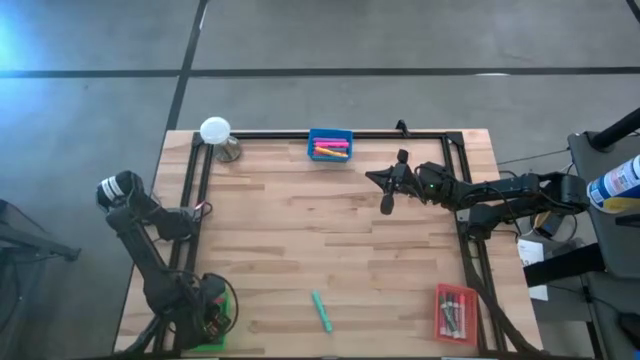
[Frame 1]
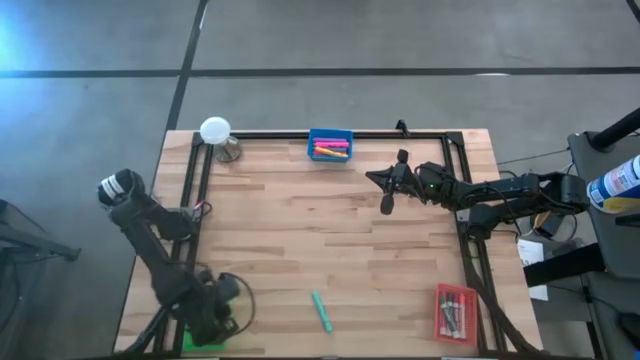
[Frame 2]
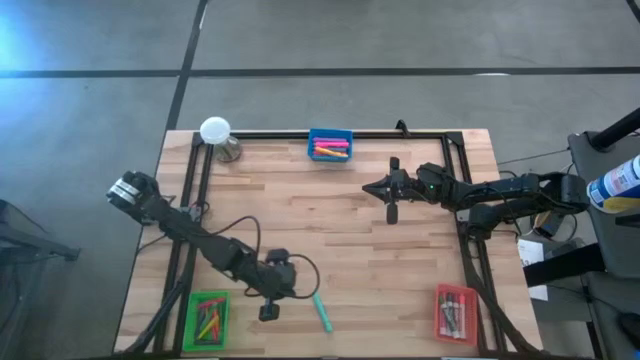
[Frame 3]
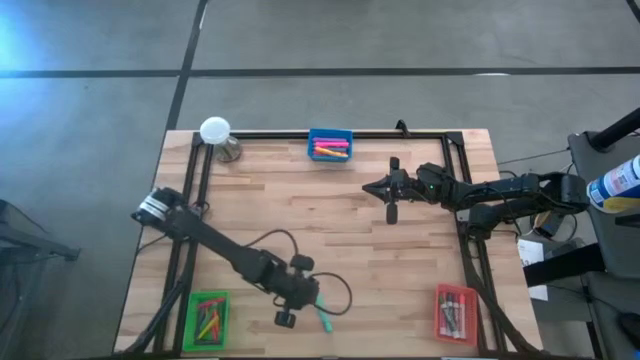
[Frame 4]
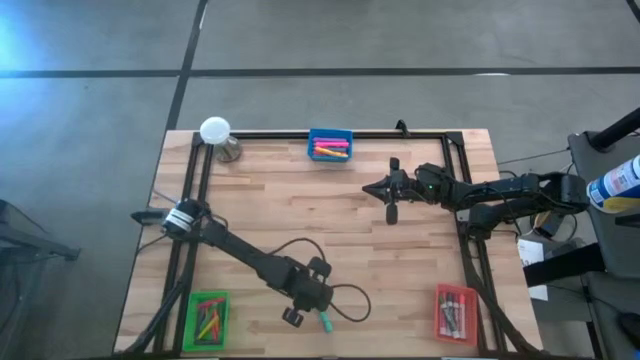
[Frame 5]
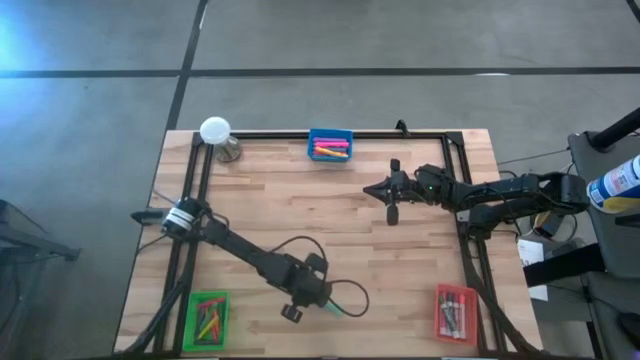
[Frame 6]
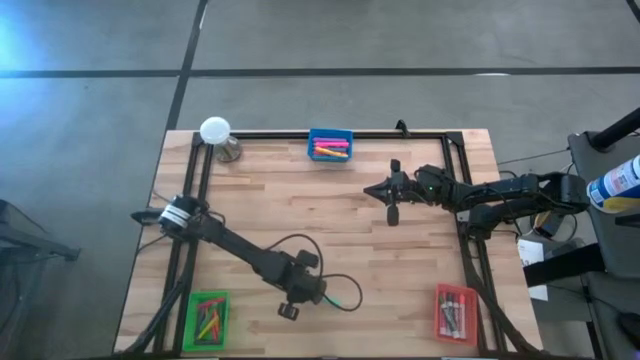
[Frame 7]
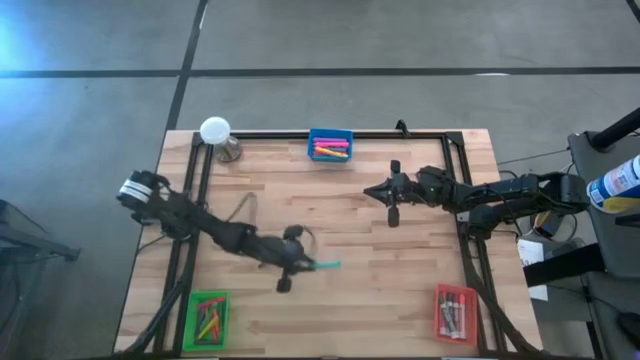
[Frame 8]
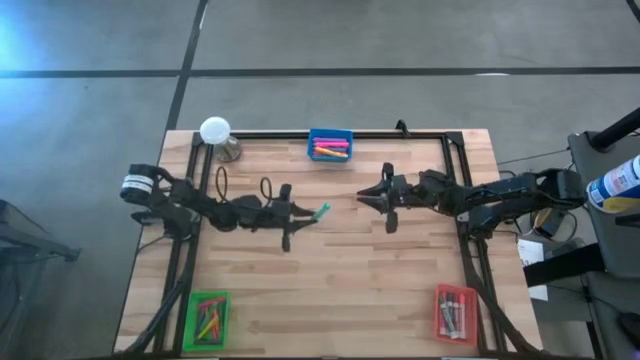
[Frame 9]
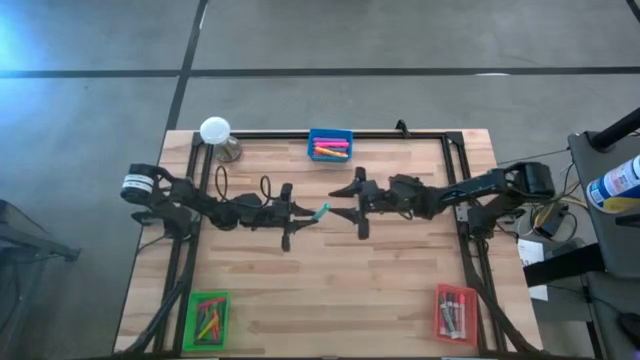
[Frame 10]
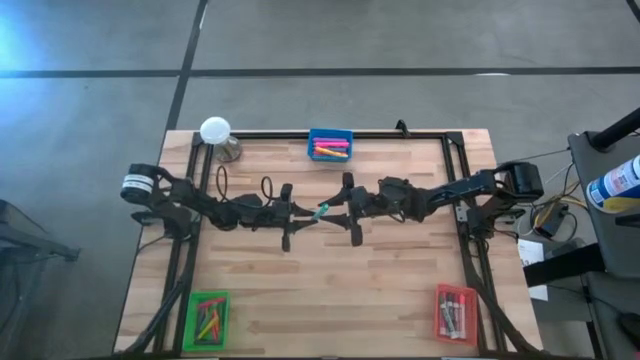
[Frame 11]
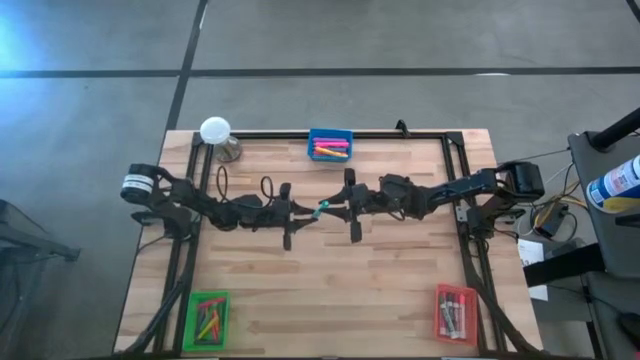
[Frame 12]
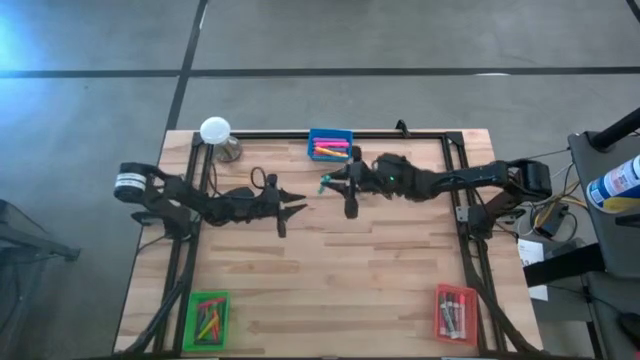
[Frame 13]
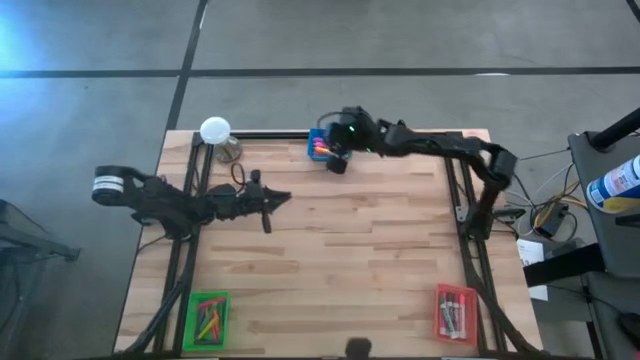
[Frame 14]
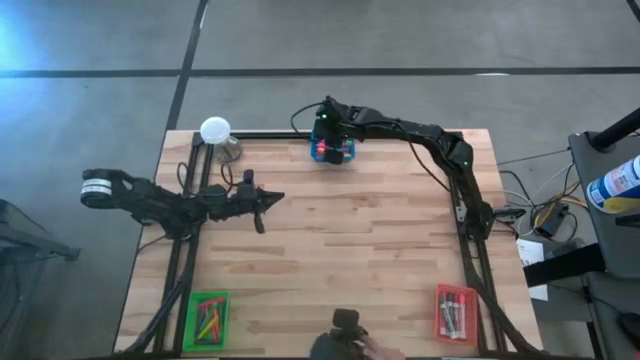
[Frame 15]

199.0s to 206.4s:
Task: Pick & Place Markers
Put the light blue highlighter into the blue bin

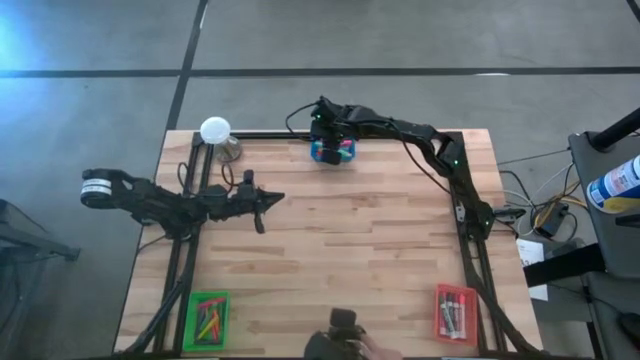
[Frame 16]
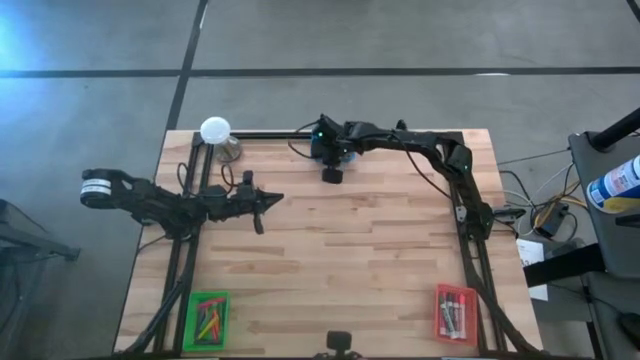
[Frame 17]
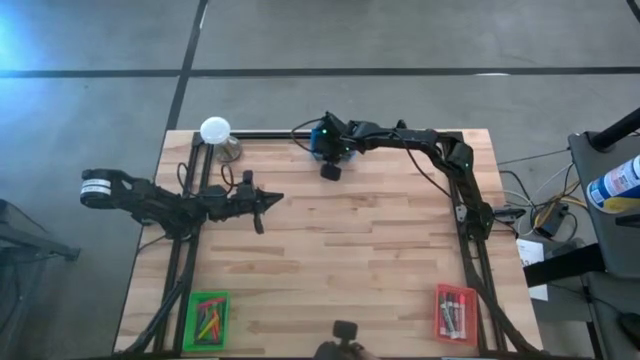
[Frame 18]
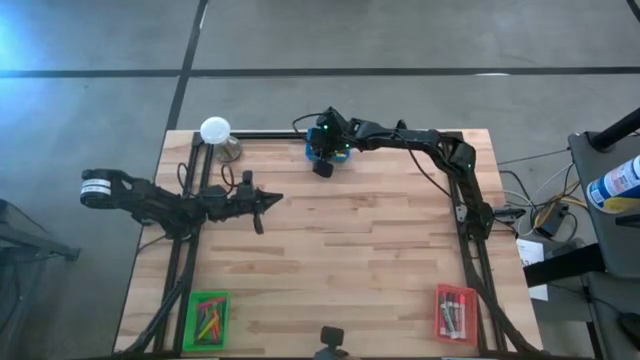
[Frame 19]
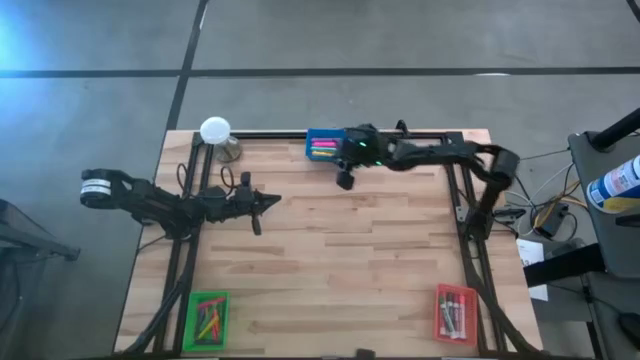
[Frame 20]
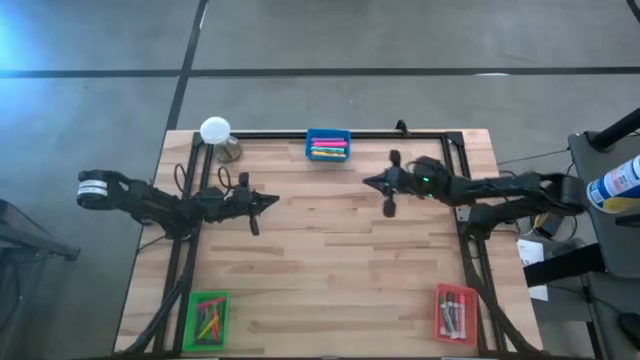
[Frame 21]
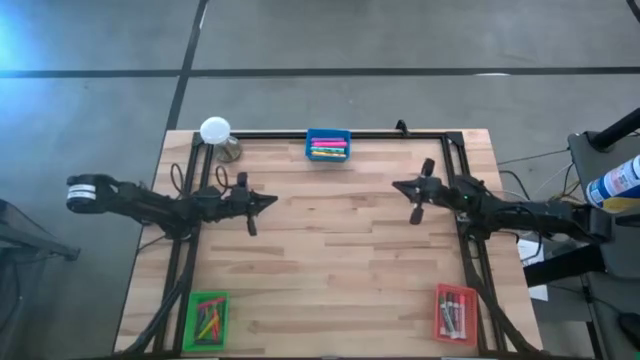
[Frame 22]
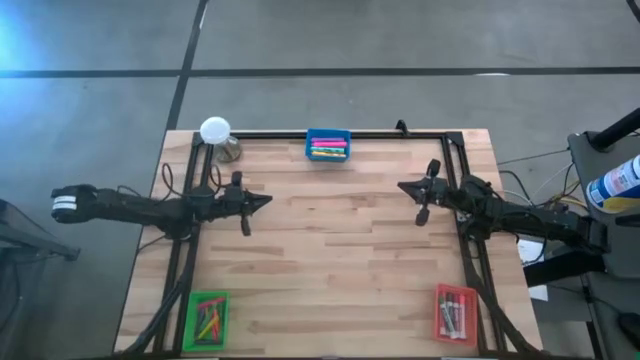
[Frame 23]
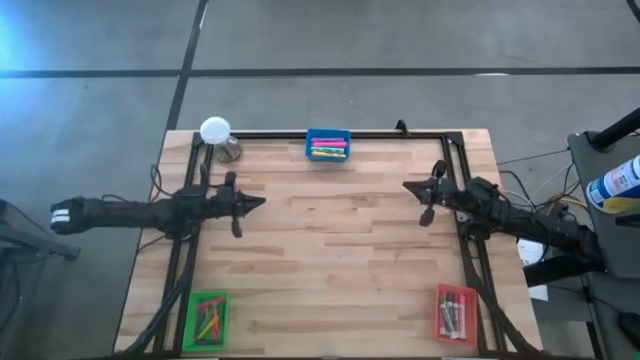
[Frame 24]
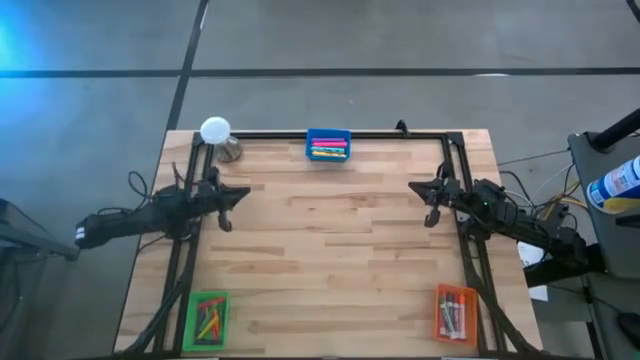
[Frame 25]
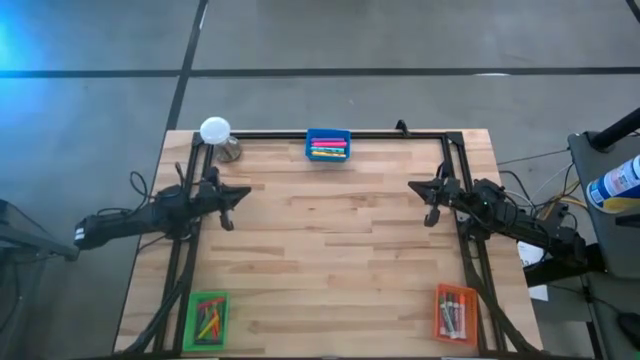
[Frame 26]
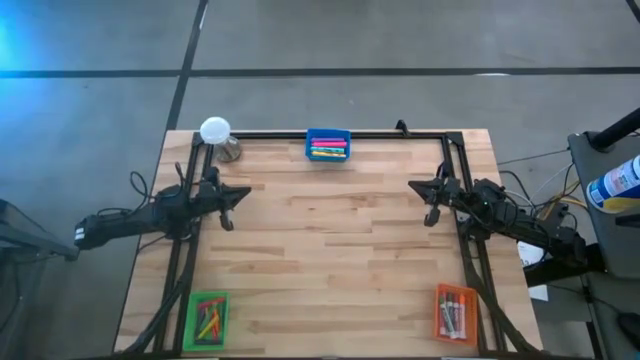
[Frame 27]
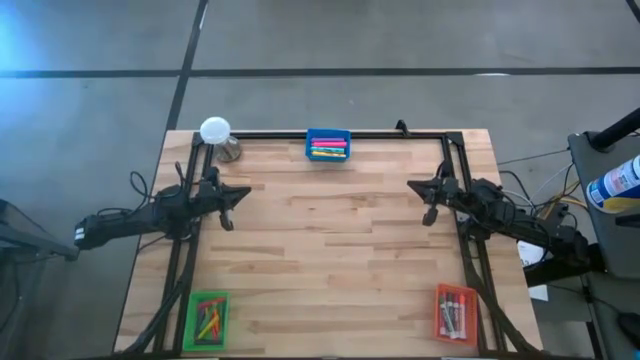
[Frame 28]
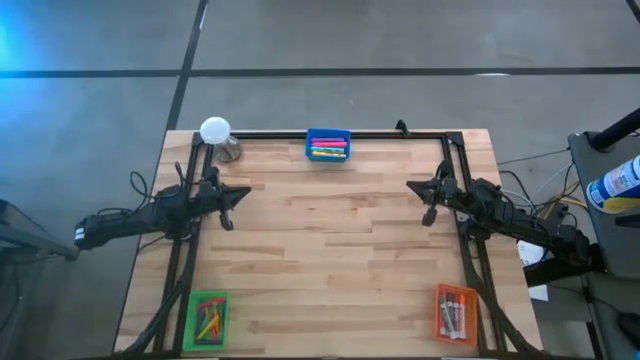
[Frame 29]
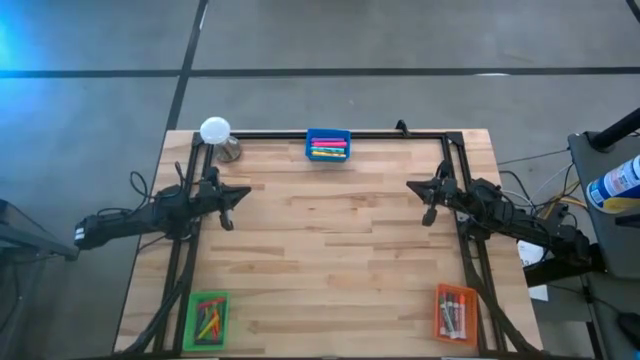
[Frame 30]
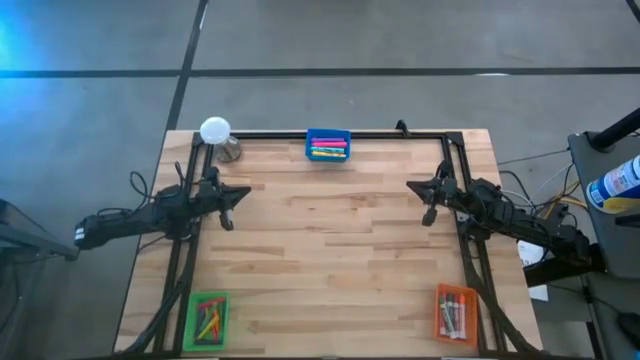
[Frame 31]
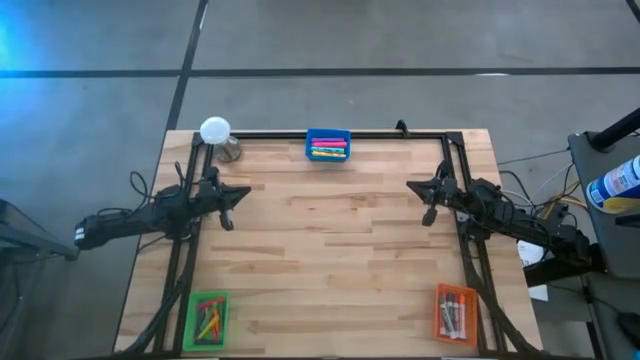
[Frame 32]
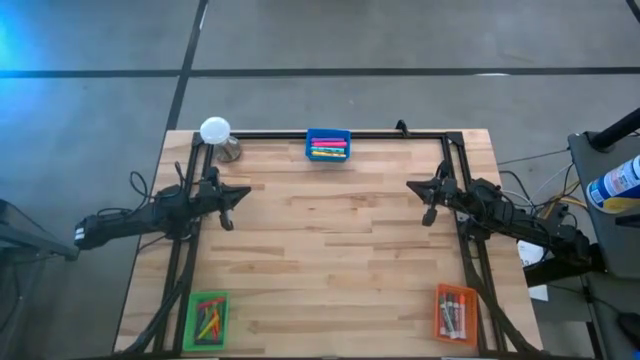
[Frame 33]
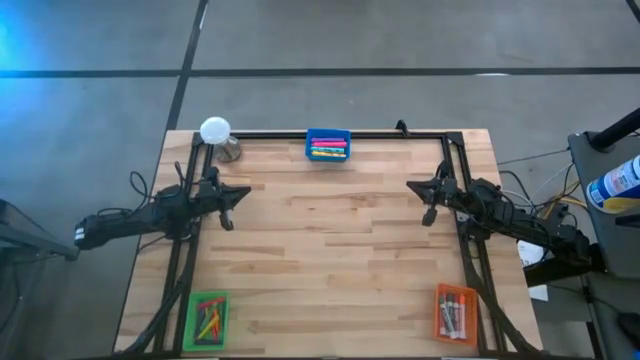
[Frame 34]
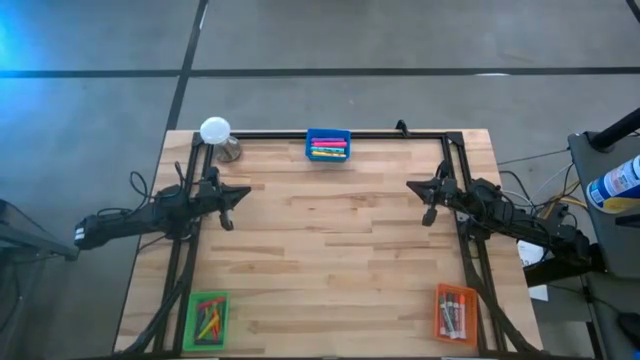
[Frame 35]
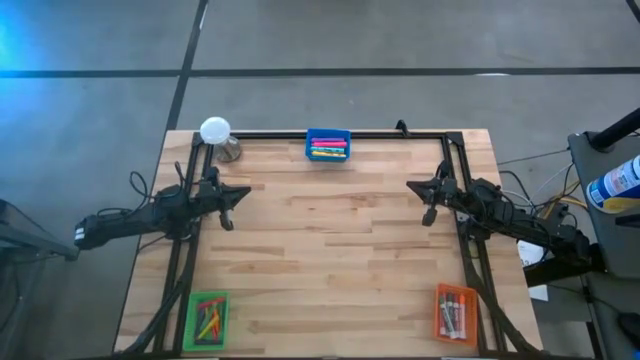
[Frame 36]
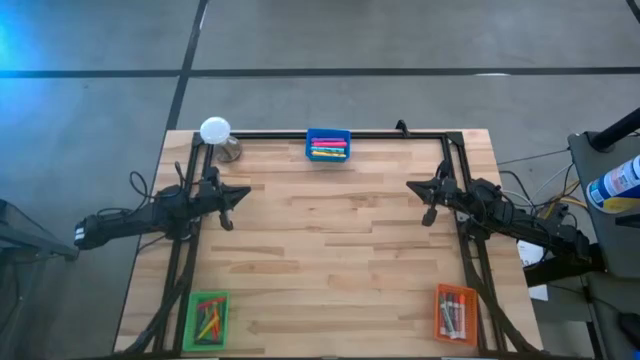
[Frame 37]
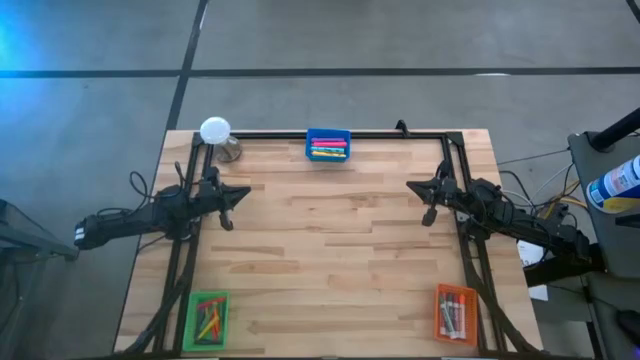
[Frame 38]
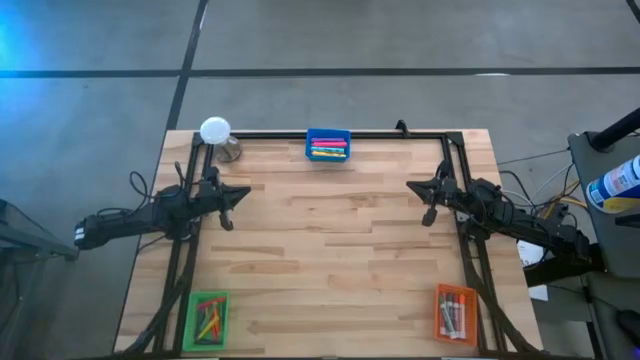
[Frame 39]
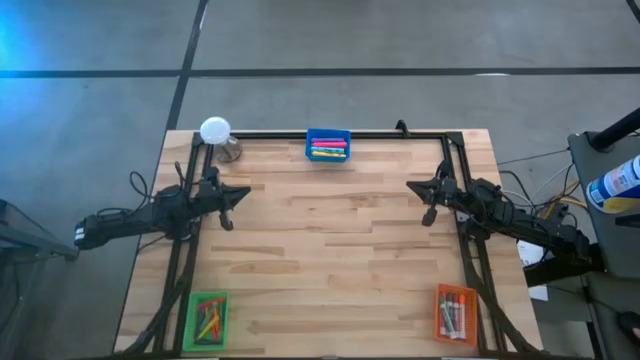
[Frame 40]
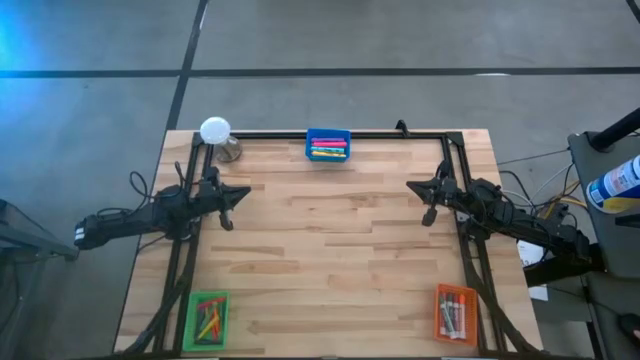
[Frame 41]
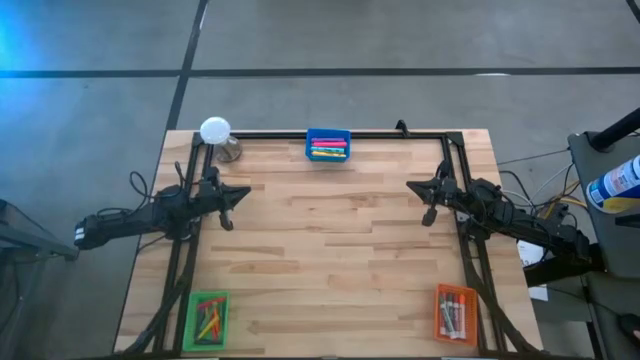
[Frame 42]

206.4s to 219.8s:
Return to Home Position
